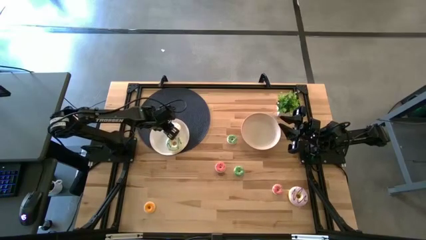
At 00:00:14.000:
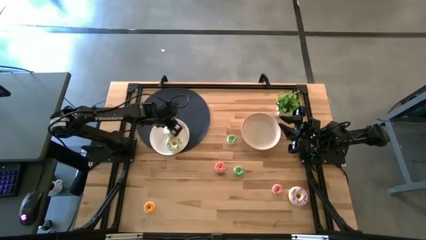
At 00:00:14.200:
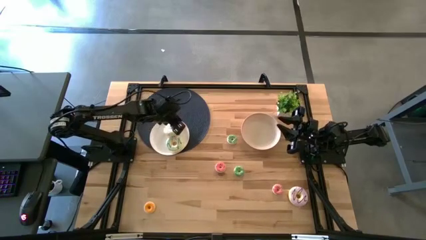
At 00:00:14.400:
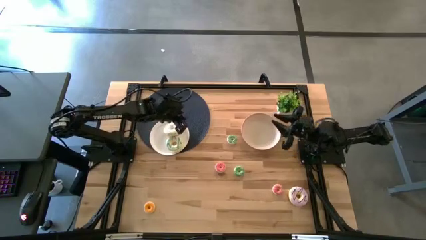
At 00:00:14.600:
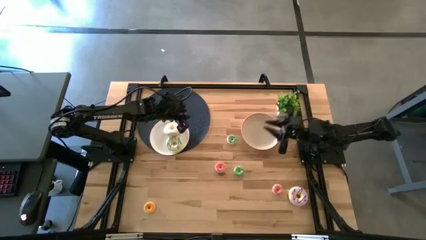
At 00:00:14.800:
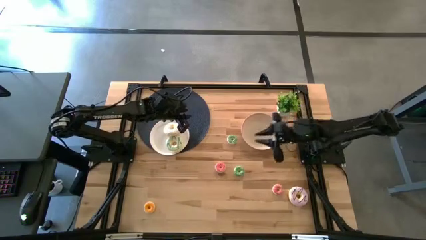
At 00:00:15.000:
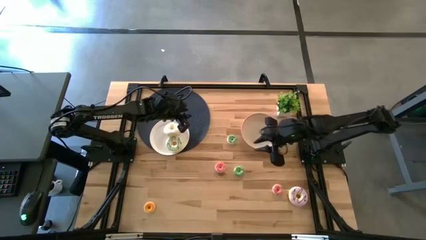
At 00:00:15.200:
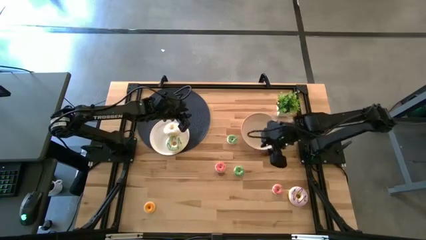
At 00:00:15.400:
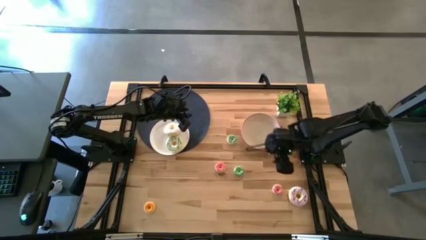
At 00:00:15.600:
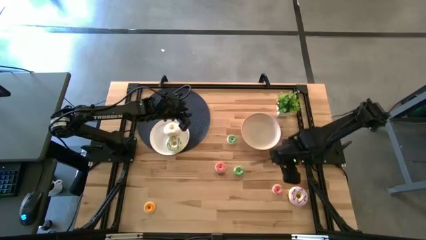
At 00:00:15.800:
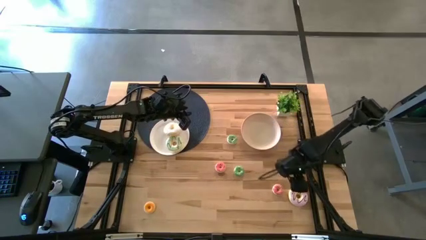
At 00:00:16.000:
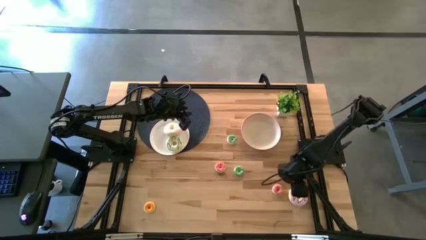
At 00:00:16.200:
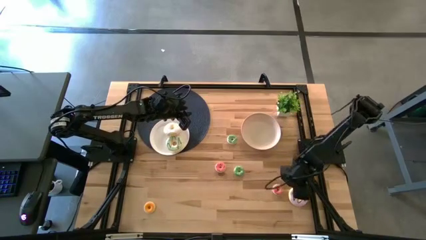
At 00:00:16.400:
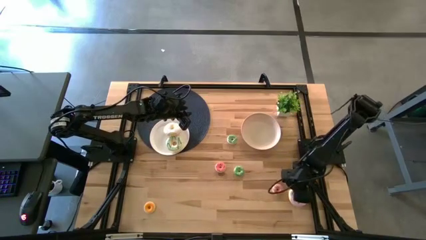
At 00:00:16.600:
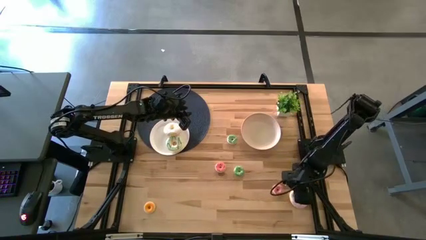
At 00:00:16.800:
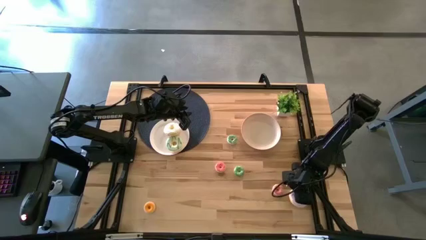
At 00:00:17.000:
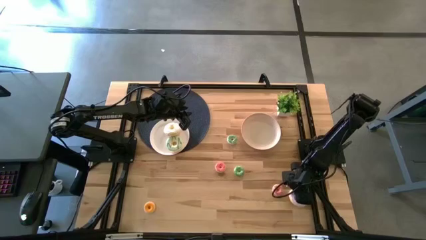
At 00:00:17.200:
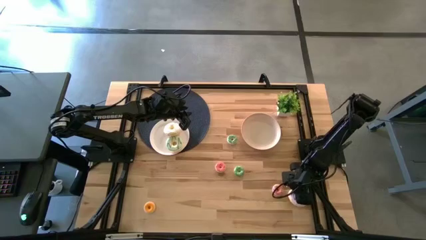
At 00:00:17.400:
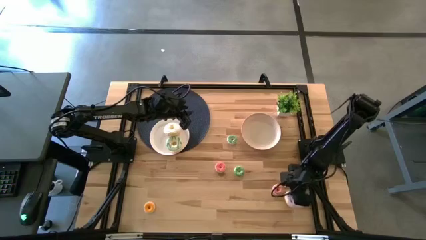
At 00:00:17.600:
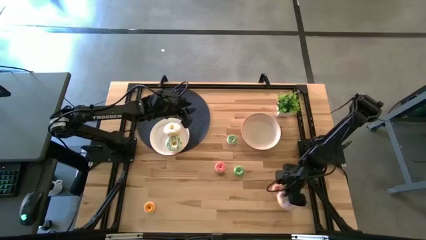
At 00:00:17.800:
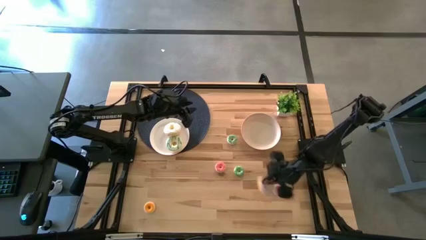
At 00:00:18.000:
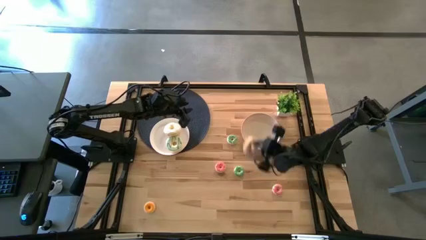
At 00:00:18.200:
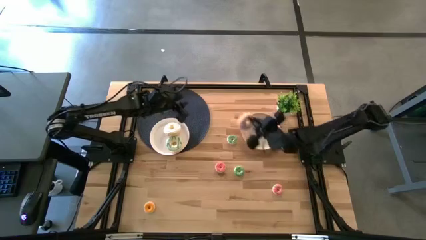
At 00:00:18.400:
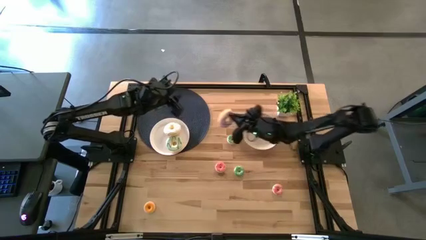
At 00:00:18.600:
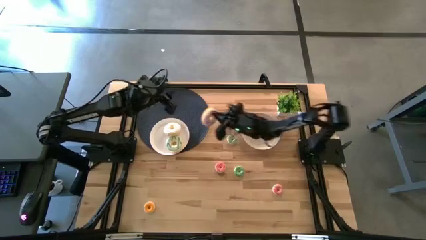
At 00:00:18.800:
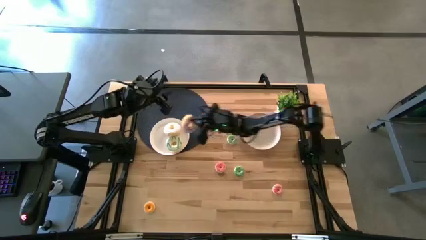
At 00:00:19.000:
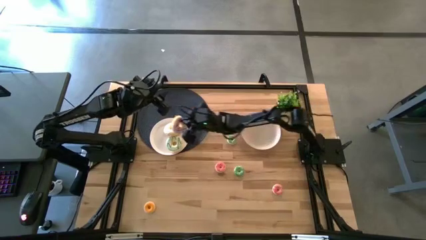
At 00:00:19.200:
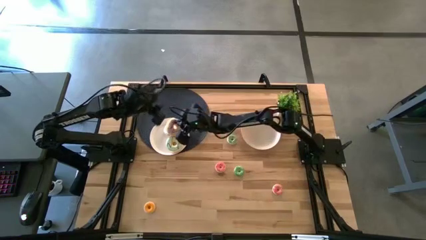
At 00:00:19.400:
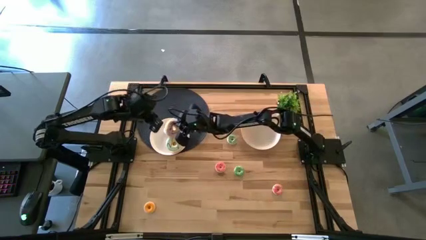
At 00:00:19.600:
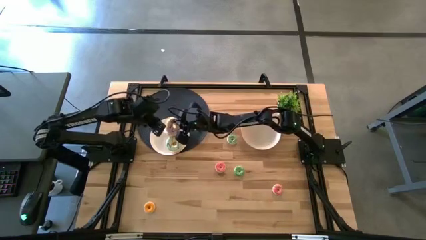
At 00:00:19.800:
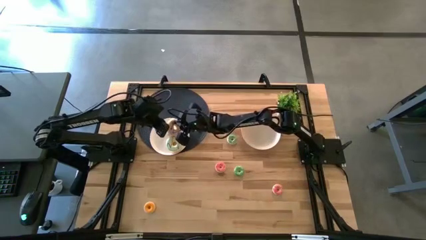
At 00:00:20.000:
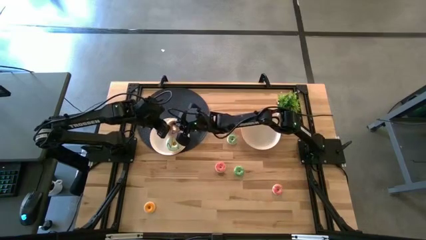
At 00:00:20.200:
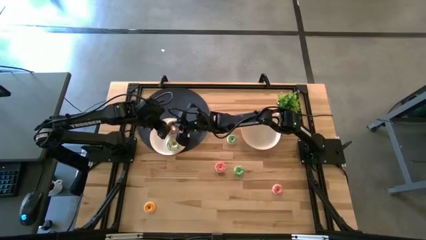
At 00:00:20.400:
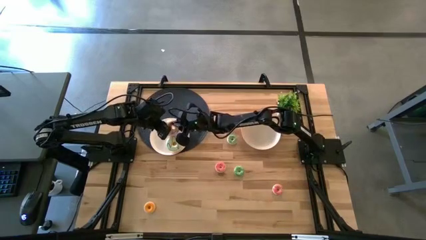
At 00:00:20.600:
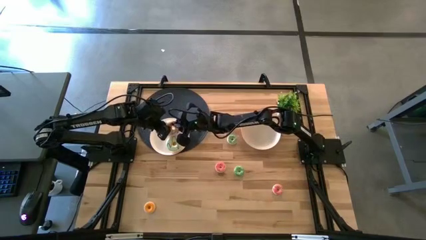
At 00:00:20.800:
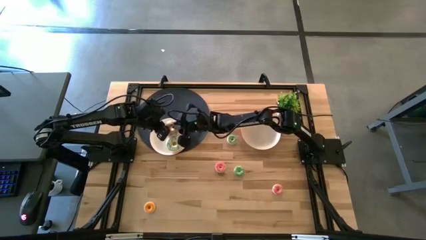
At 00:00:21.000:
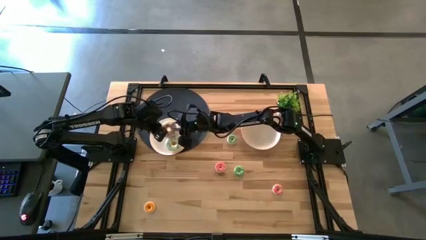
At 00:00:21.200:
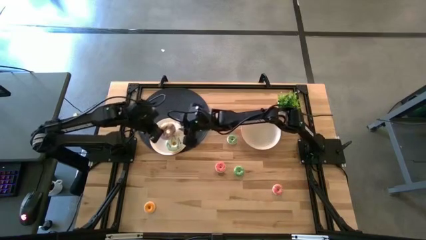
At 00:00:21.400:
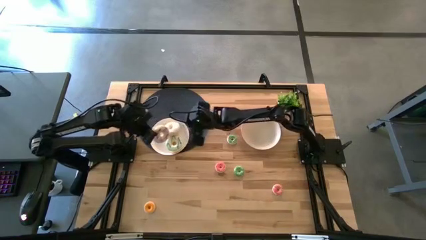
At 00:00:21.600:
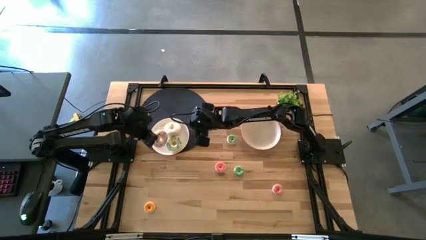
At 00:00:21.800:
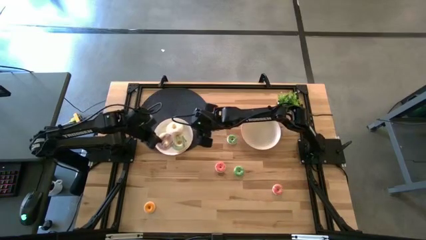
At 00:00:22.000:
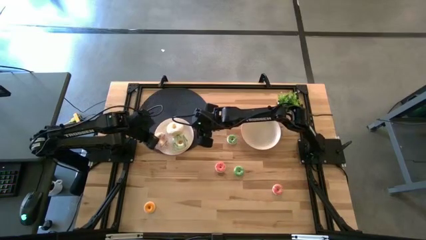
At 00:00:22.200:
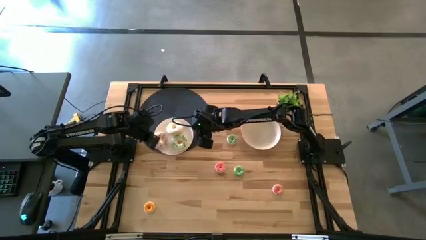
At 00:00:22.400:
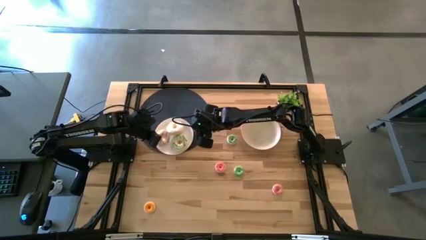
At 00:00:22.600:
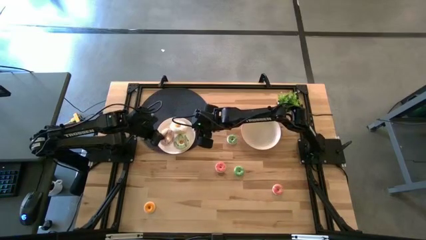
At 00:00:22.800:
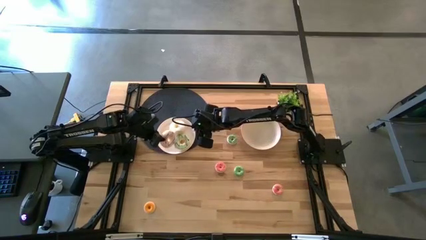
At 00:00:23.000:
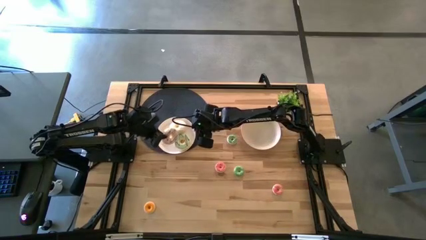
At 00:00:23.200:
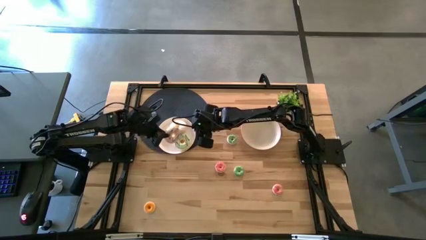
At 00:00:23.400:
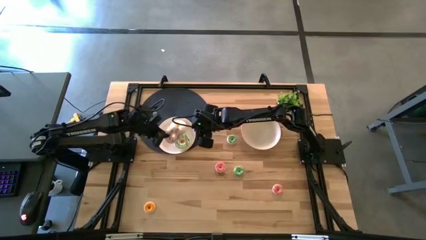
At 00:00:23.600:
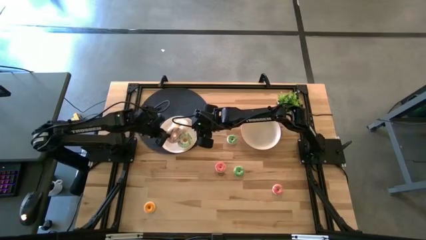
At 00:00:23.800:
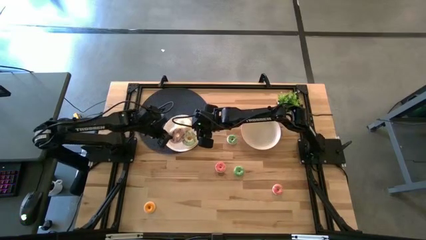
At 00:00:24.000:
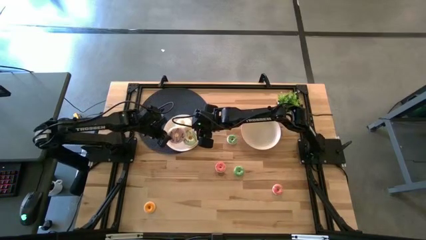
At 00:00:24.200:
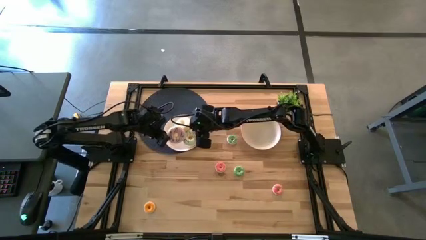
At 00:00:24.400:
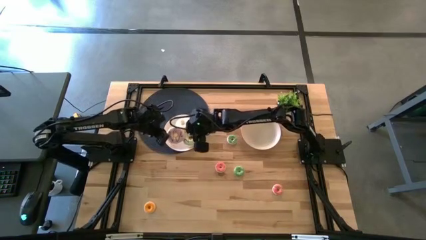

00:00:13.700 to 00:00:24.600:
Task: Pick & Place donuts
Put the large purple donut on the left white plate

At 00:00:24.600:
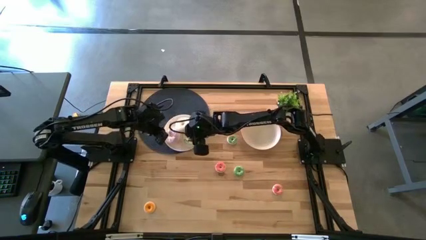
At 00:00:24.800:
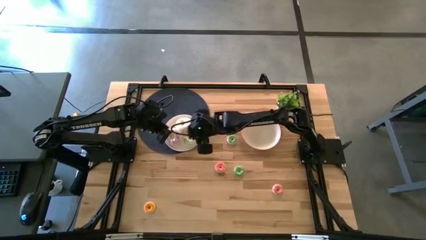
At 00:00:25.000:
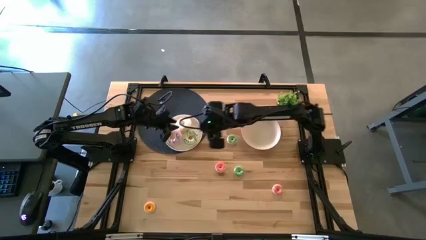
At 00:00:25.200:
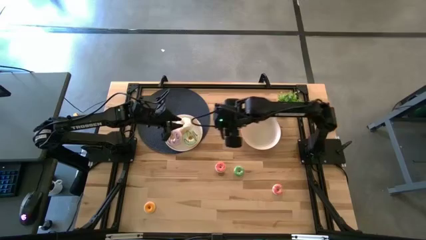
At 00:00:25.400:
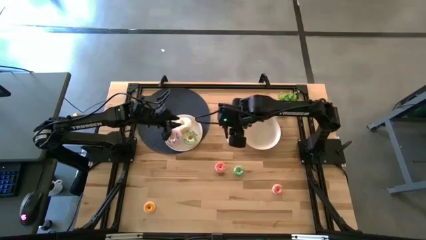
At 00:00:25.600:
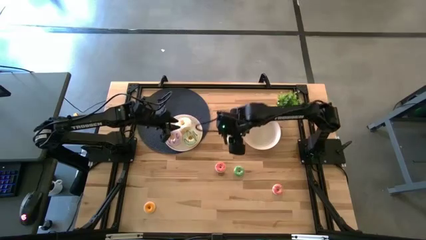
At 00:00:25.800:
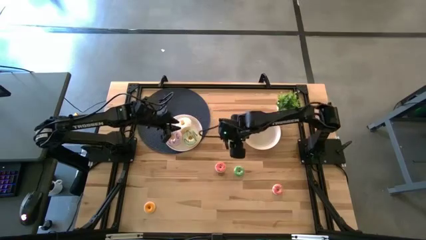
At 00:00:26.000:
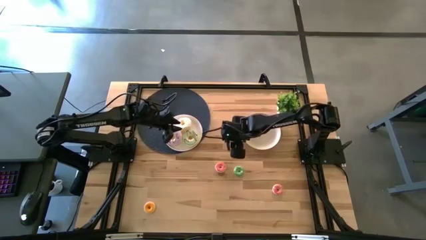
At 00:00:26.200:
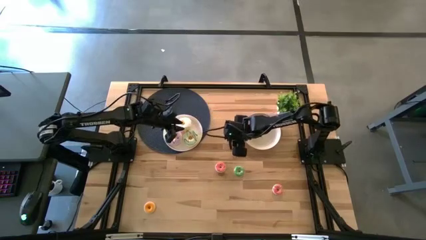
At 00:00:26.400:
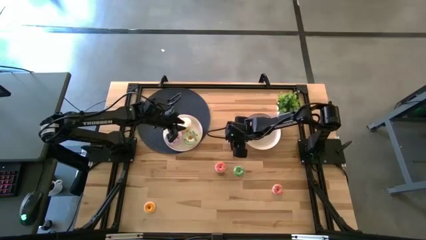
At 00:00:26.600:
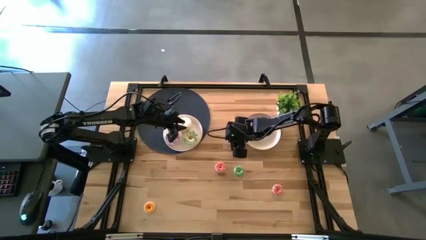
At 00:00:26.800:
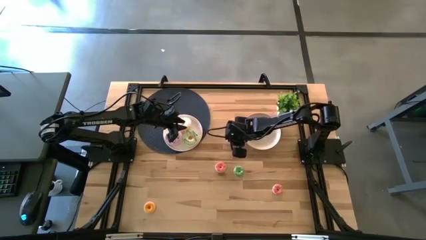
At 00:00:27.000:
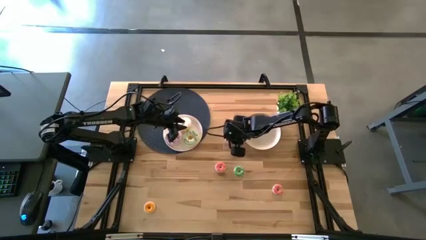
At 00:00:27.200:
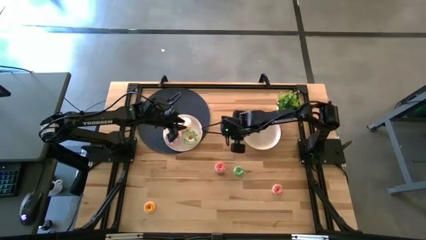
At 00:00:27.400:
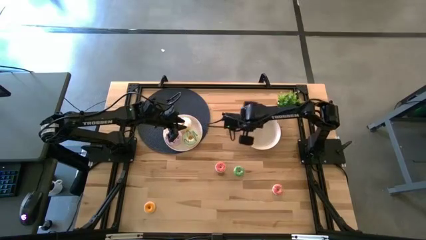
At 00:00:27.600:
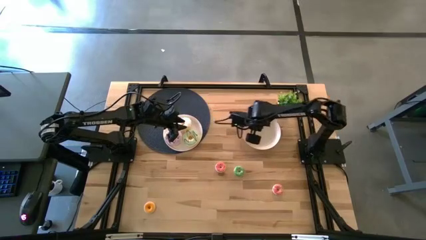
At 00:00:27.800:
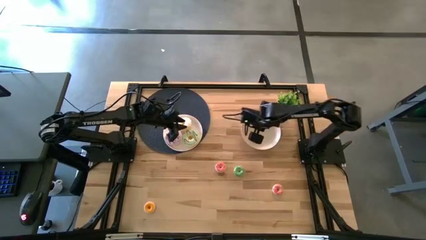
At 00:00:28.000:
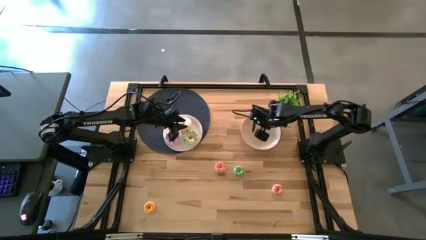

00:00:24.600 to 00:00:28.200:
Put the top small green donut on the right white plate

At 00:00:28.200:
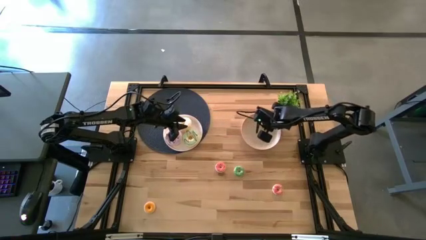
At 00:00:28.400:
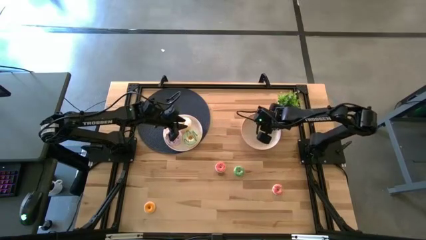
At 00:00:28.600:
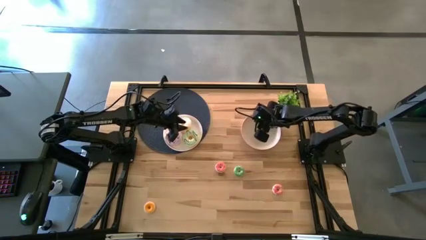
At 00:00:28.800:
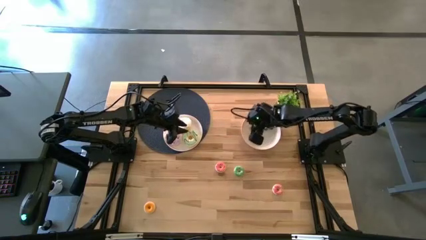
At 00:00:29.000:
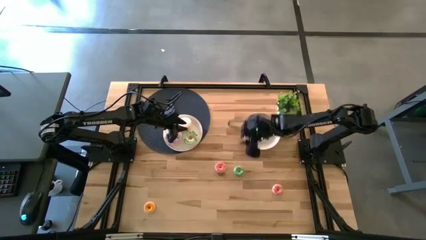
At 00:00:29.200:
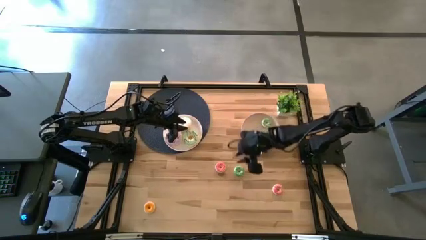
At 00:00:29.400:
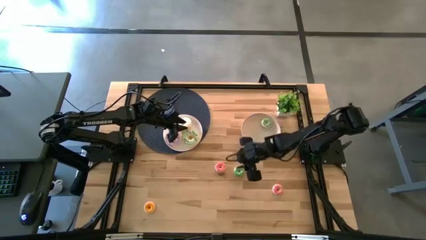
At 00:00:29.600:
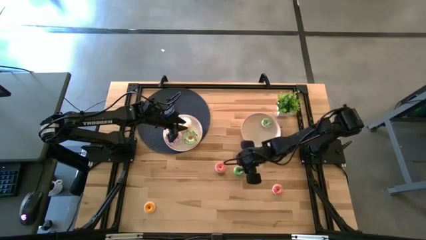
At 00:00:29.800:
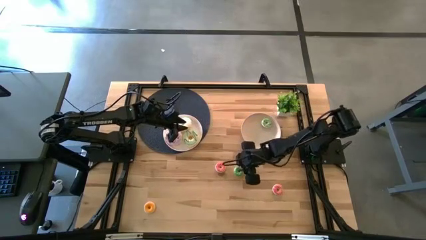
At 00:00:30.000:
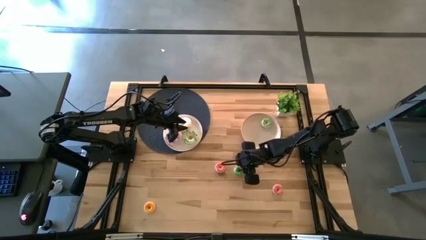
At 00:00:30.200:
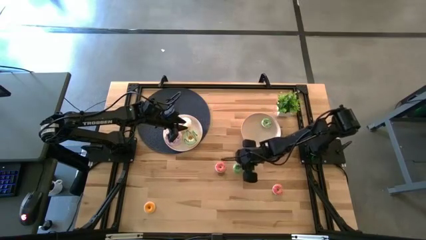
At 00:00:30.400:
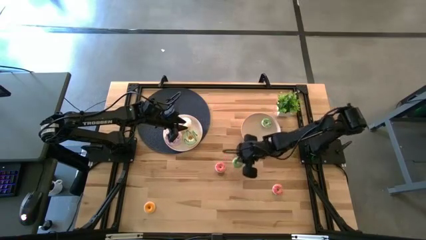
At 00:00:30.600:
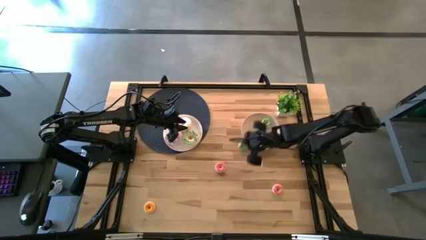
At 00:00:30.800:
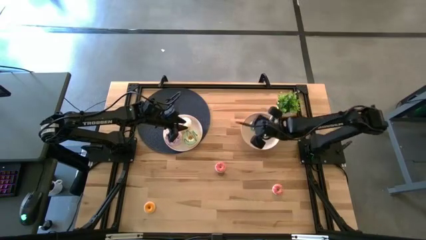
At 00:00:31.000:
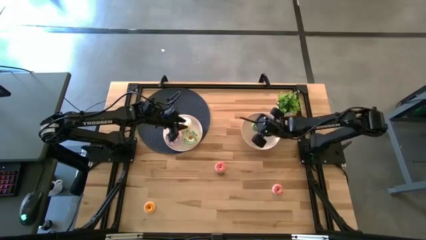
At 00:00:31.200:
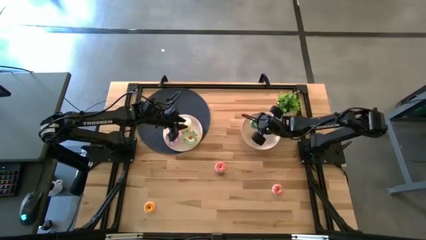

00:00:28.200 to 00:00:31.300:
Put the small green donut on the right white plate
